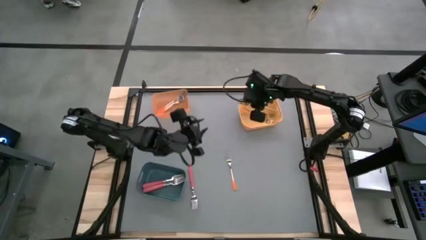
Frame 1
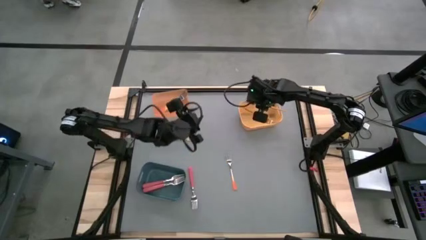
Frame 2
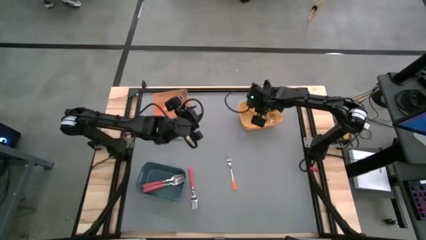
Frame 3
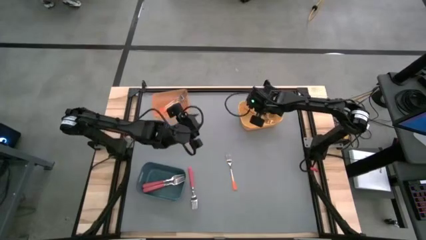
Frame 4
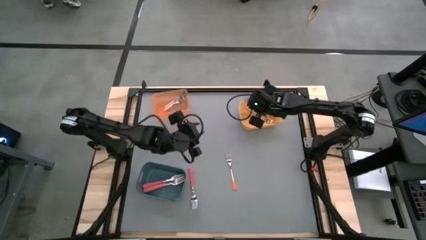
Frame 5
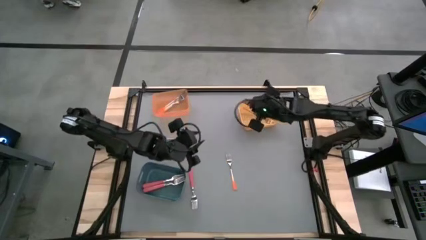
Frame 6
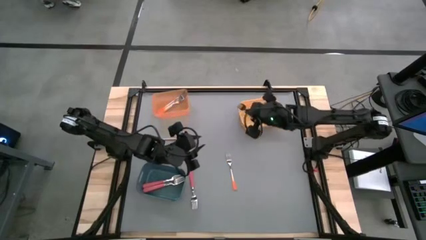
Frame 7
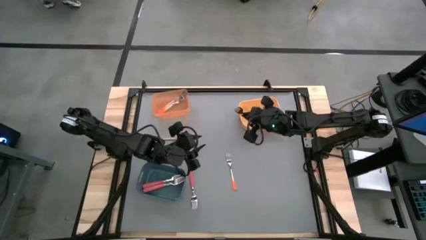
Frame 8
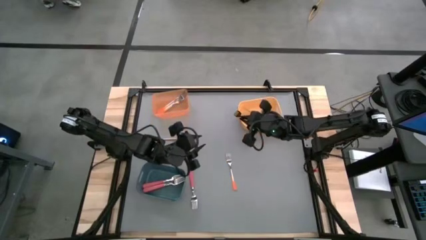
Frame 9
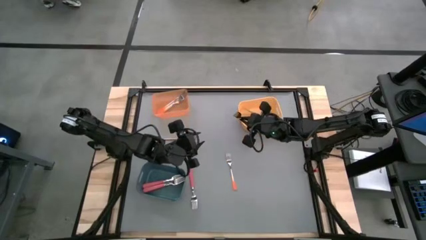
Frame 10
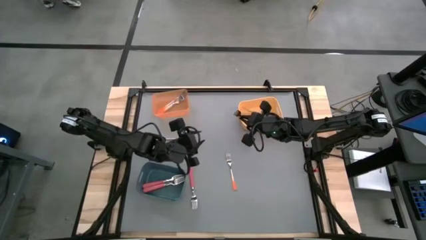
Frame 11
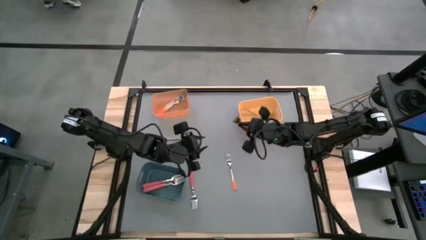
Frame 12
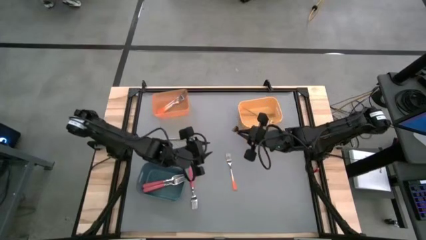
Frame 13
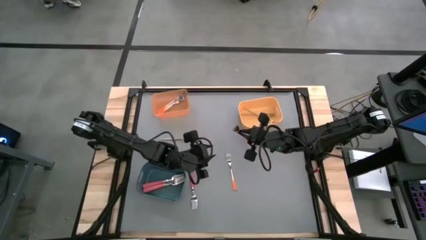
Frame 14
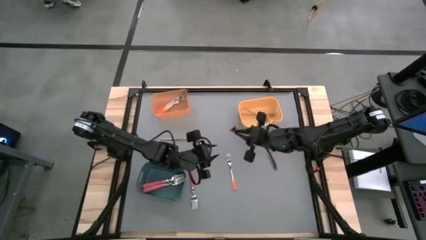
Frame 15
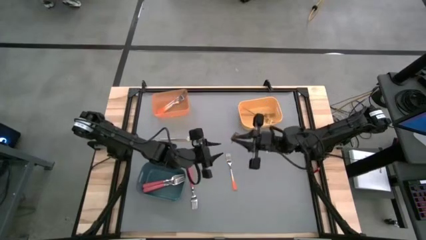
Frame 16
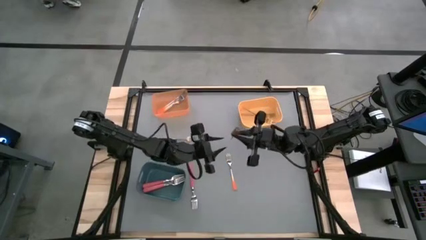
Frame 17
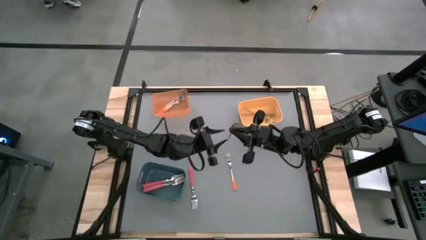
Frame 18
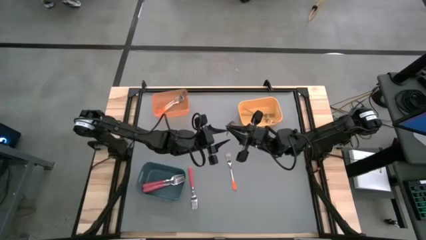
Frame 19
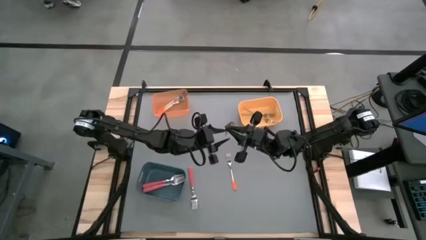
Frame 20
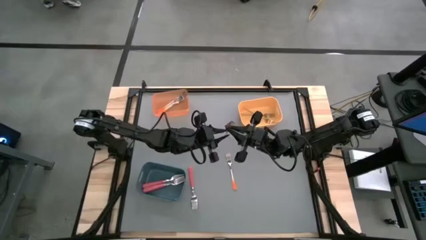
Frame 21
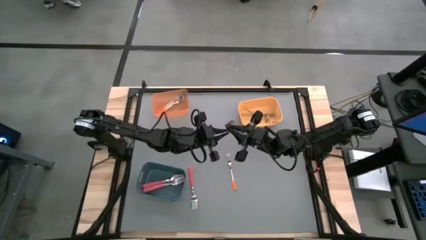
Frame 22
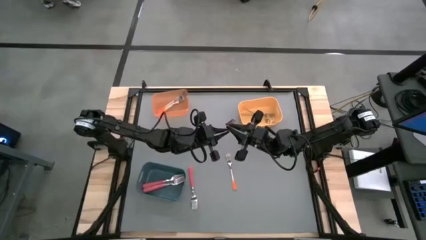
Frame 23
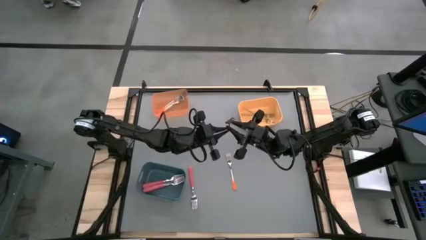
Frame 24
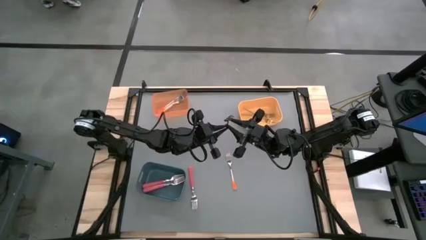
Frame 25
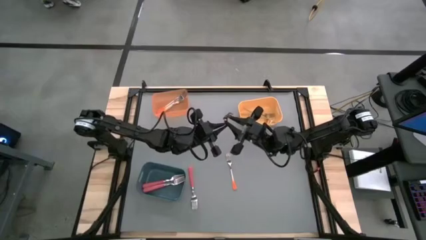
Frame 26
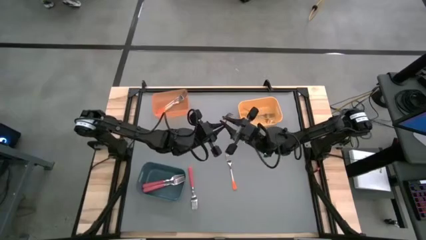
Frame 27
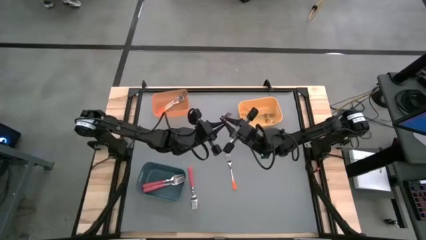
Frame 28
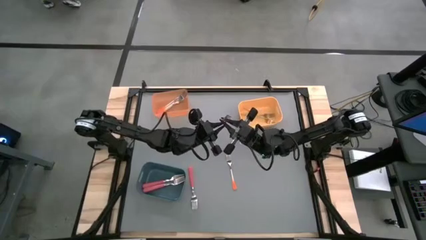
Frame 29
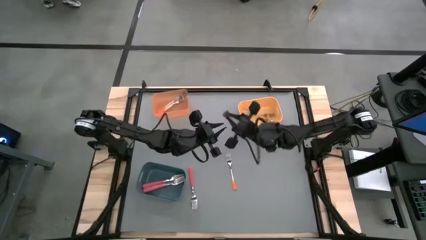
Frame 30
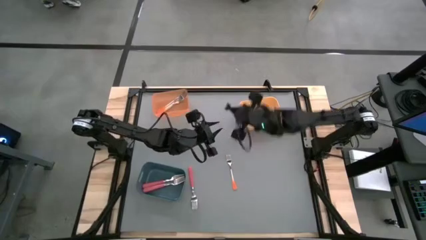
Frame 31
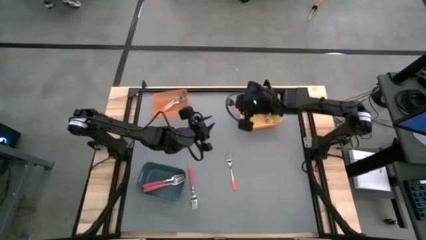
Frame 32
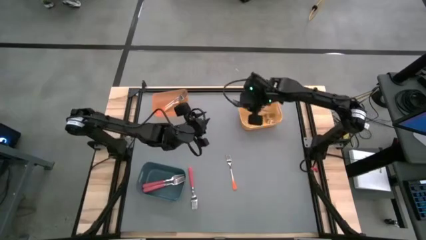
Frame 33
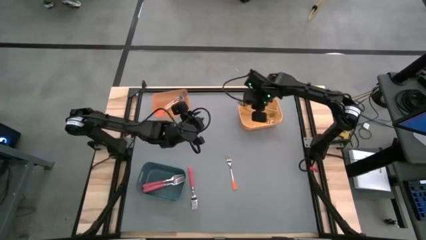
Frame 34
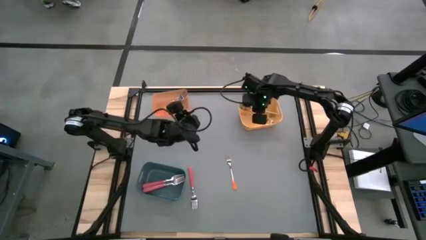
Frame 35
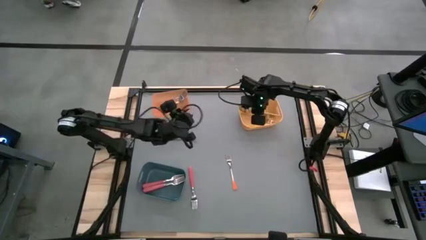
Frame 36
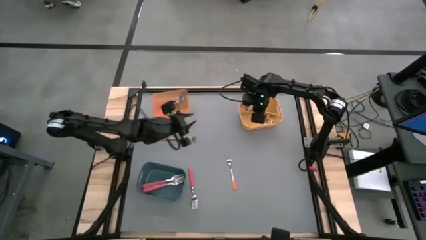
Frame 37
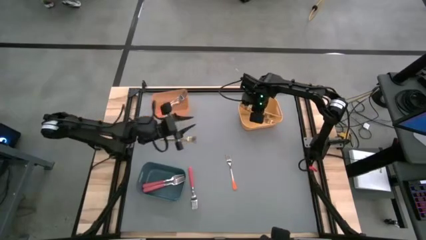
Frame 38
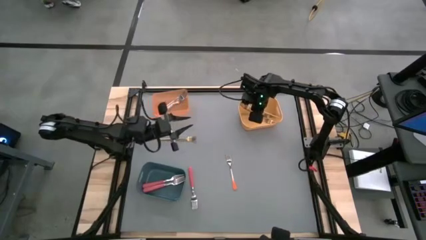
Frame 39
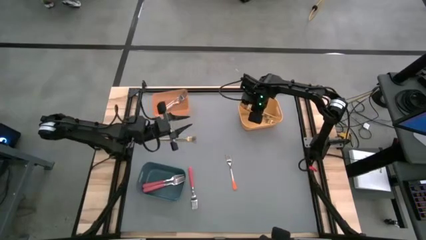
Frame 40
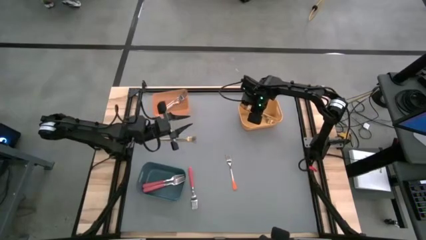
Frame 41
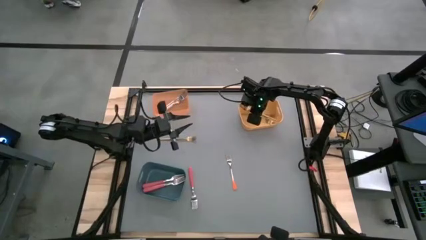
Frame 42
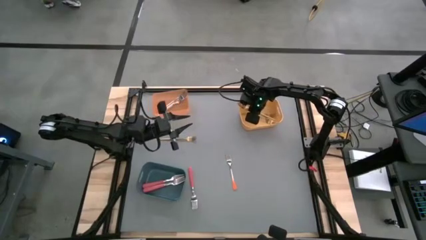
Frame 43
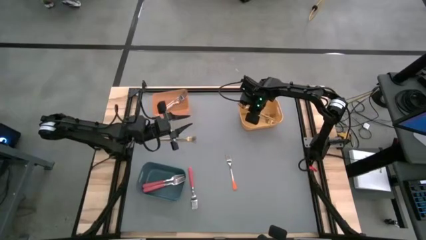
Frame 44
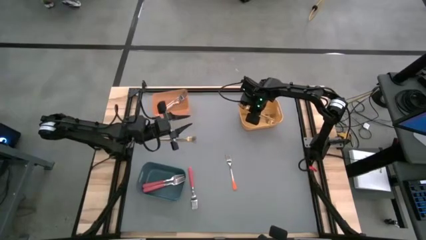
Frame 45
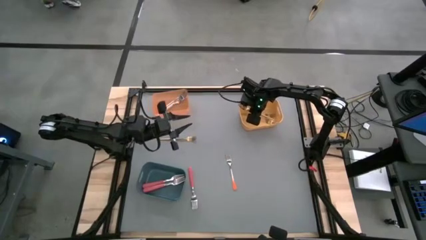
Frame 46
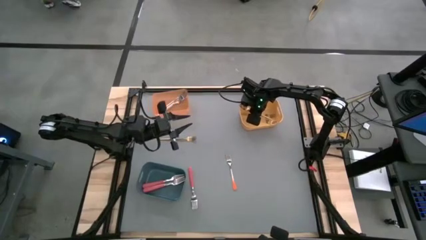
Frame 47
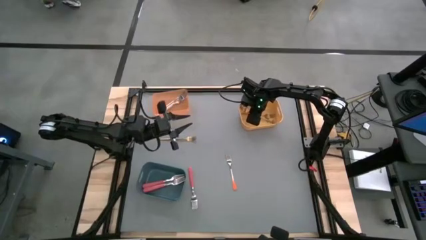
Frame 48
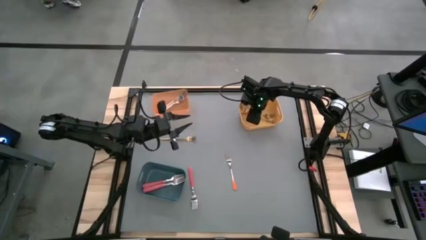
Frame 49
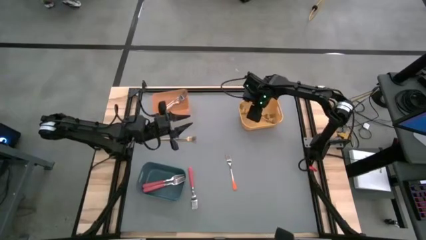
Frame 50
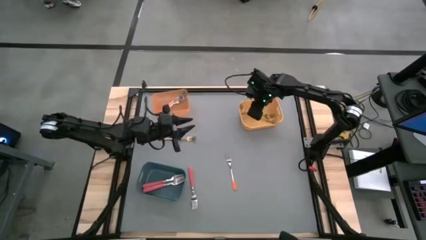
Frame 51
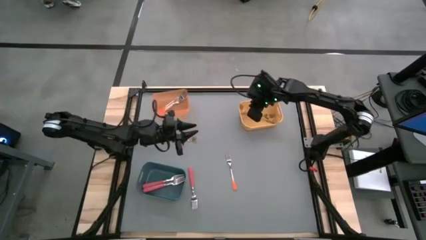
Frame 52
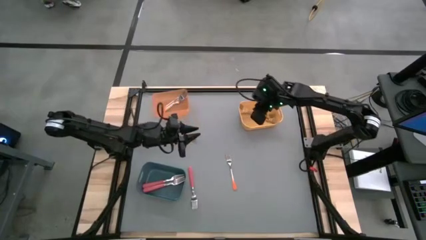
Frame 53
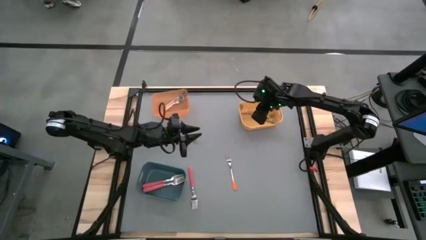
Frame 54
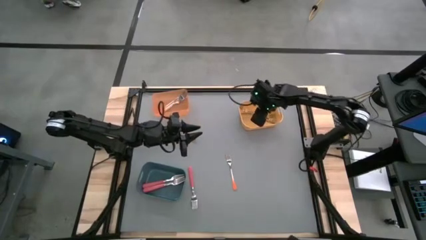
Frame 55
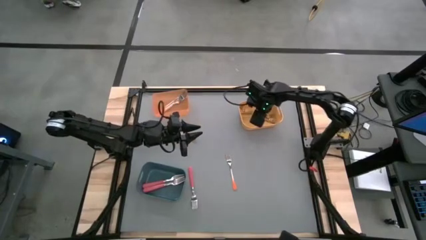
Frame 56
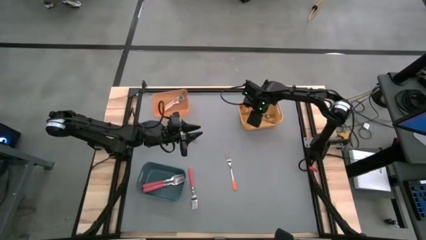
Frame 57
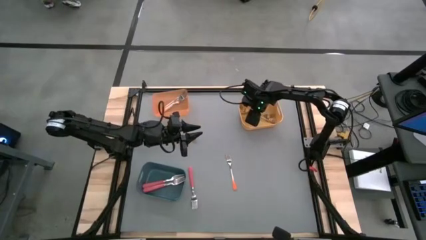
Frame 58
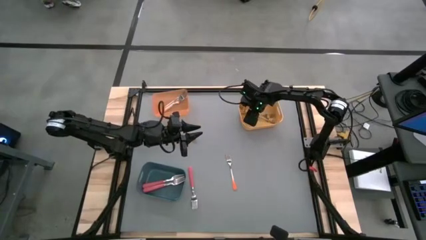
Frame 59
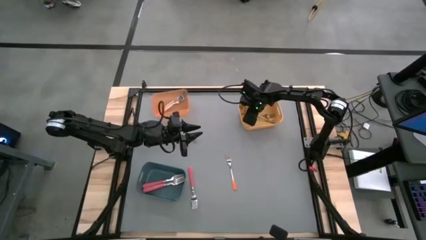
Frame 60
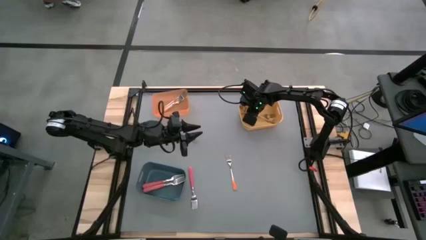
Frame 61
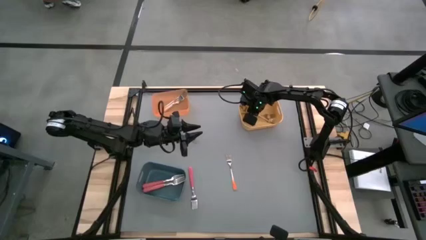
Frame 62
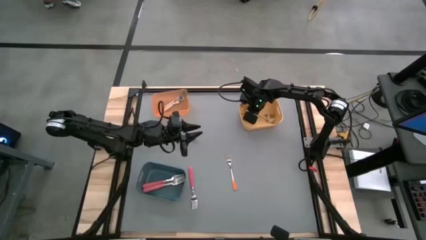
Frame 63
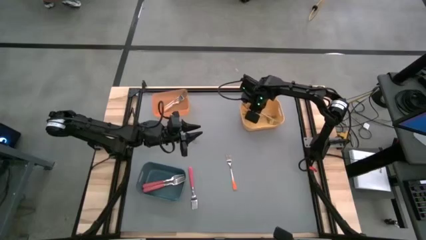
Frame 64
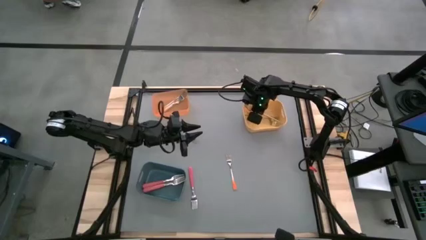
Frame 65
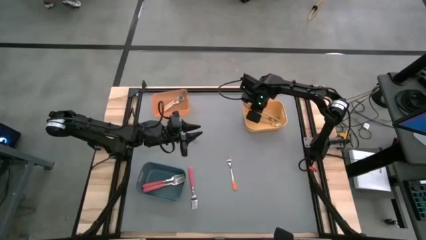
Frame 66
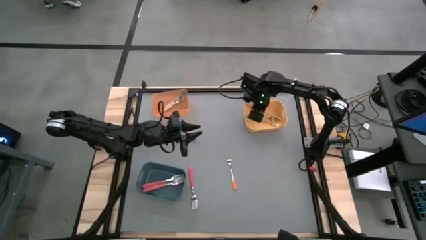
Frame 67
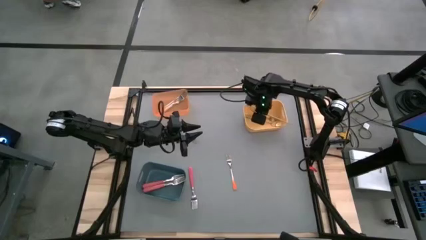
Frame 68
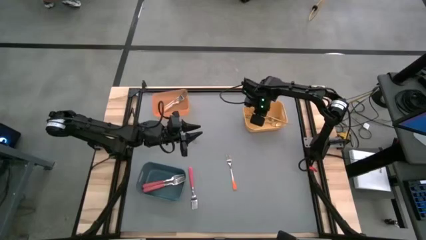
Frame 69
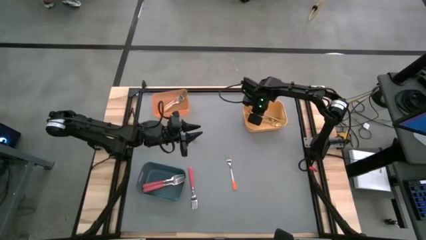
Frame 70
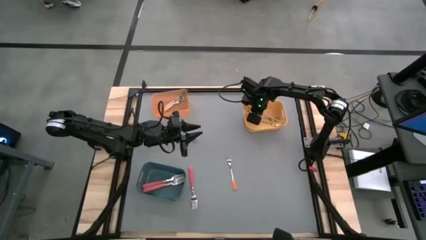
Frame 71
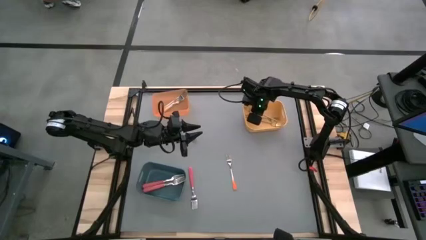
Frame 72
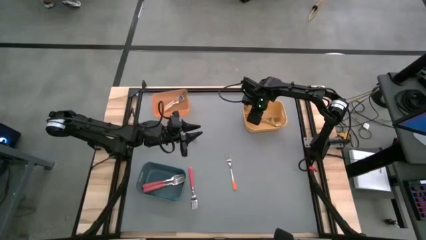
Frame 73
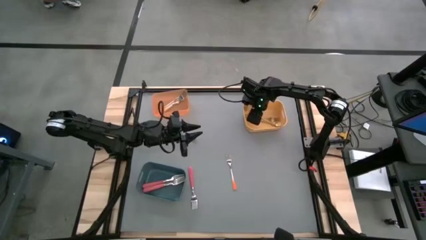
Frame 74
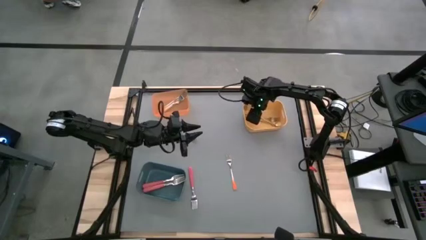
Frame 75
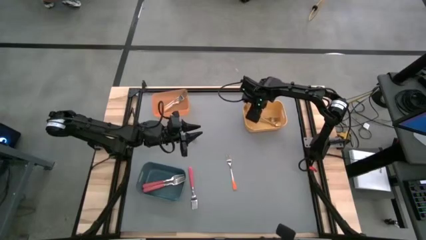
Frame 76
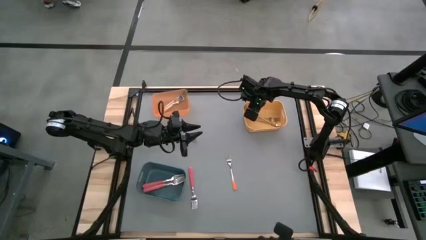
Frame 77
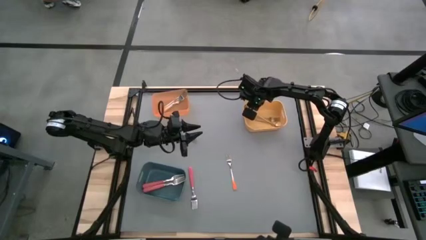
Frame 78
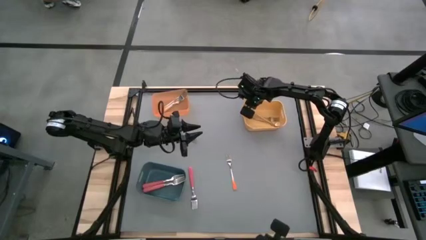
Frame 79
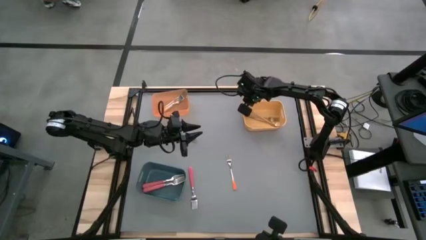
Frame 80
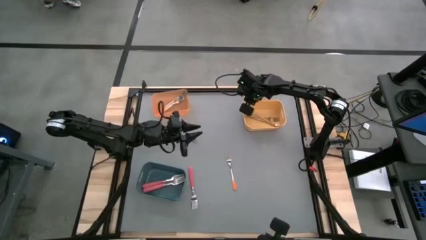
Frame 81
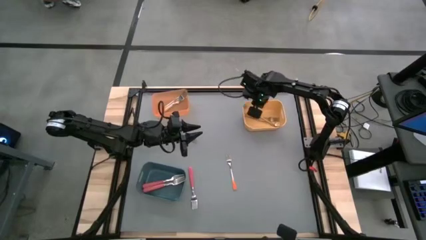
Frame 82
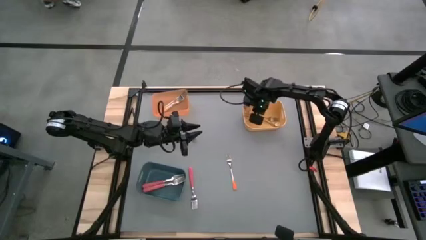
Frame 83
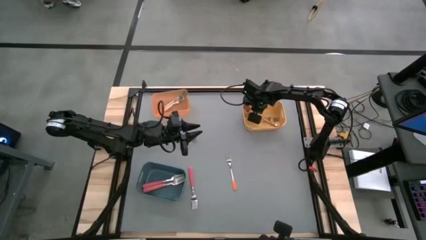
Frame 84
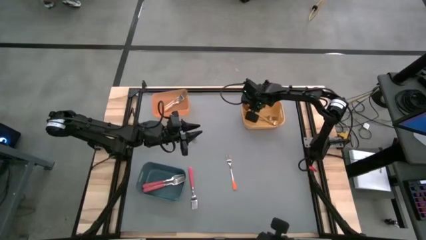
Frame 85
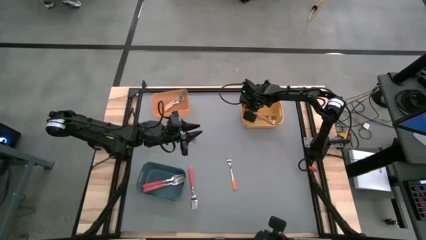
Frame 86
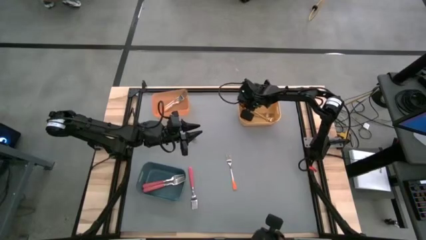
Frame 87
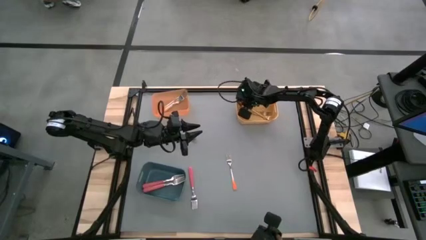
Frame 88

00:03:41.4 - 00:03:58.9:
Task: Sort silverware by color (type)
Put the gold fork into the yellow bin
